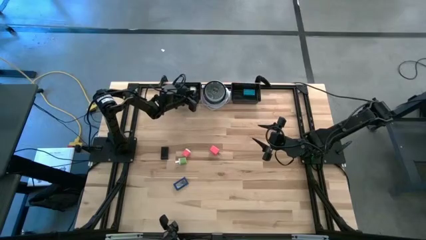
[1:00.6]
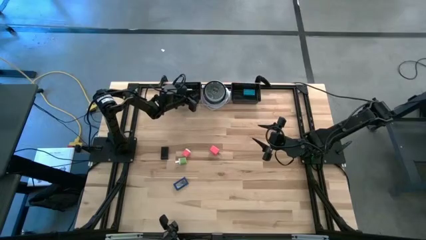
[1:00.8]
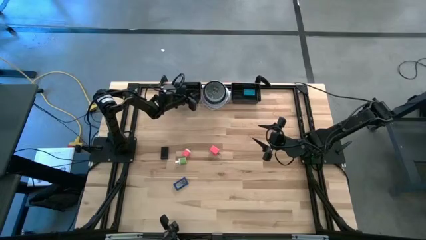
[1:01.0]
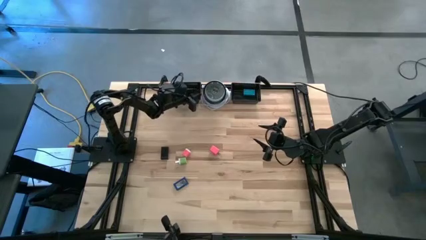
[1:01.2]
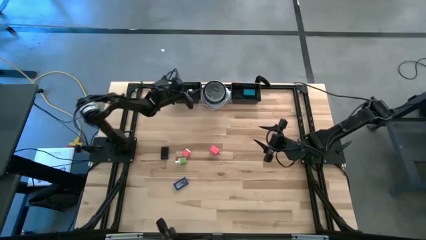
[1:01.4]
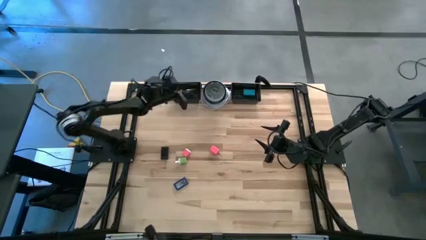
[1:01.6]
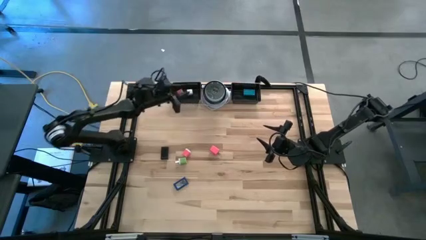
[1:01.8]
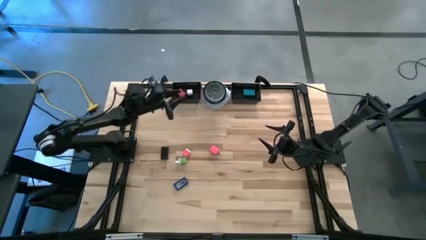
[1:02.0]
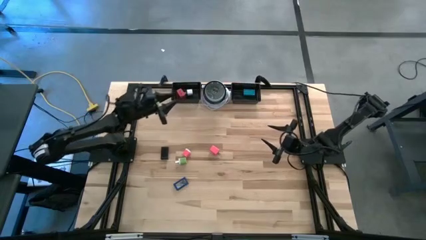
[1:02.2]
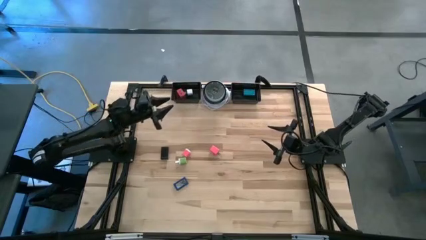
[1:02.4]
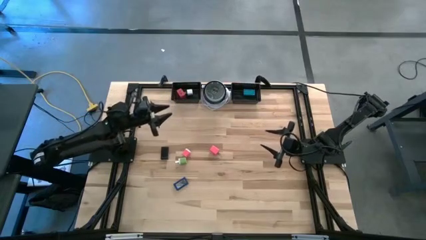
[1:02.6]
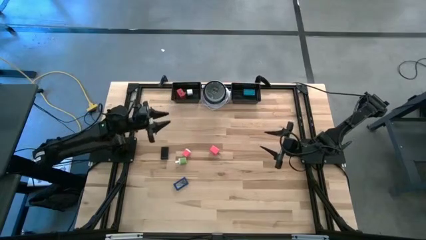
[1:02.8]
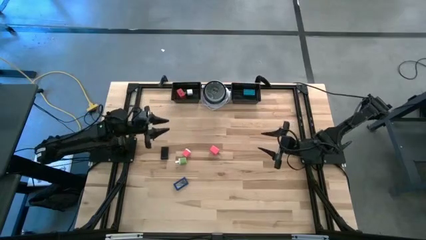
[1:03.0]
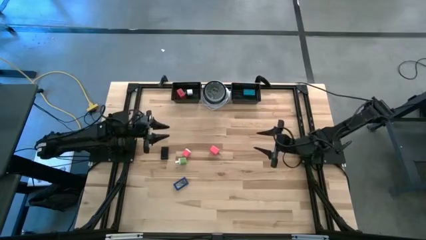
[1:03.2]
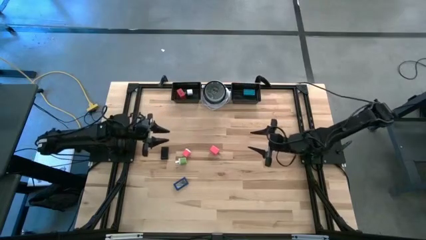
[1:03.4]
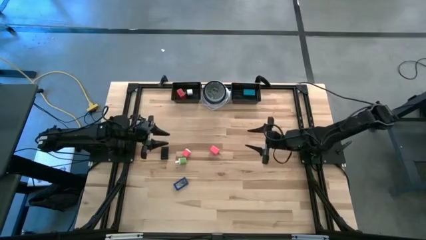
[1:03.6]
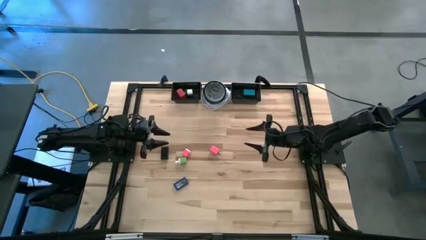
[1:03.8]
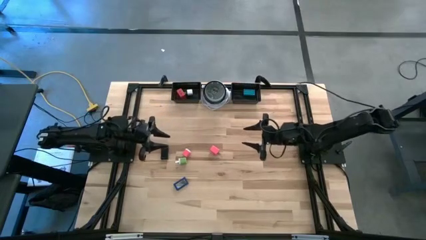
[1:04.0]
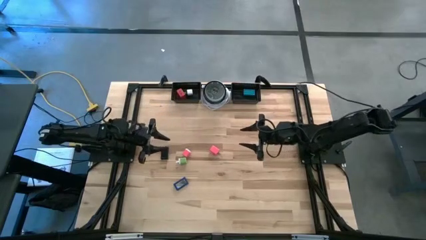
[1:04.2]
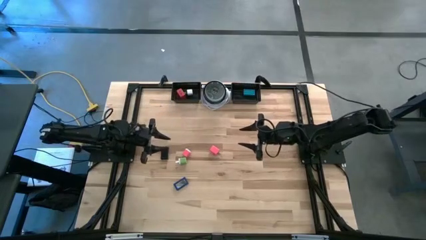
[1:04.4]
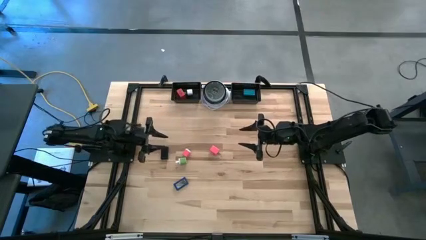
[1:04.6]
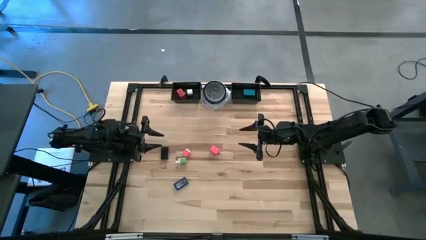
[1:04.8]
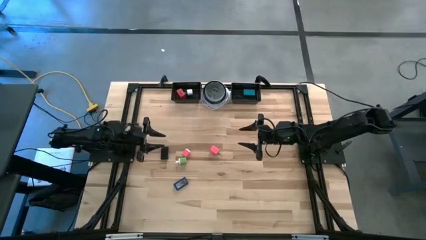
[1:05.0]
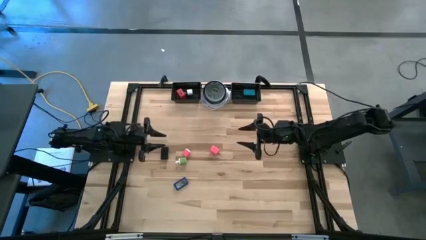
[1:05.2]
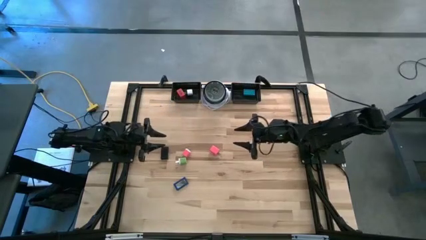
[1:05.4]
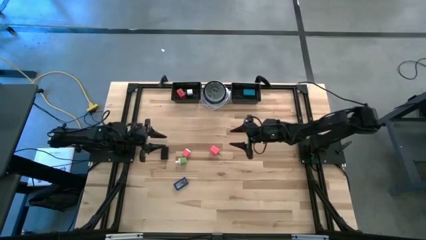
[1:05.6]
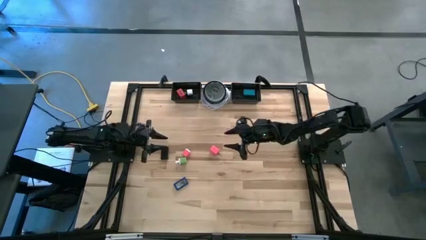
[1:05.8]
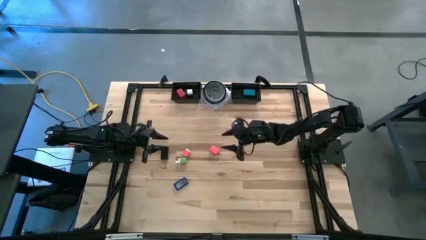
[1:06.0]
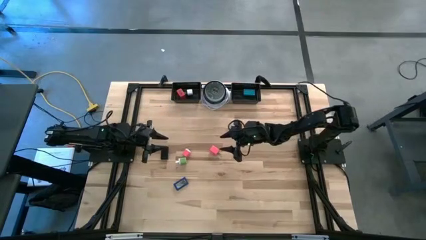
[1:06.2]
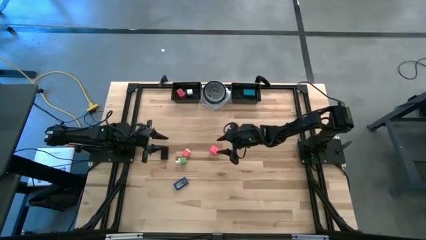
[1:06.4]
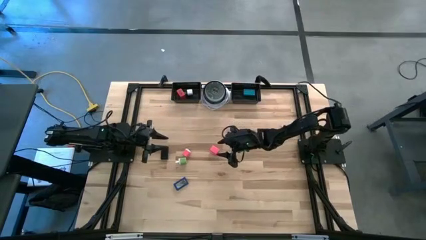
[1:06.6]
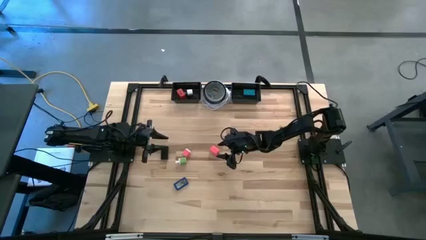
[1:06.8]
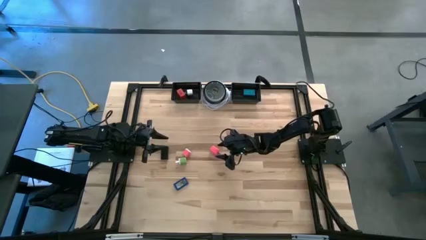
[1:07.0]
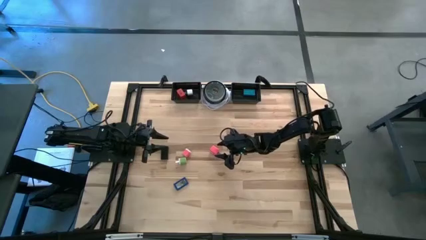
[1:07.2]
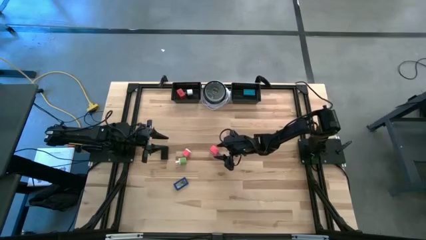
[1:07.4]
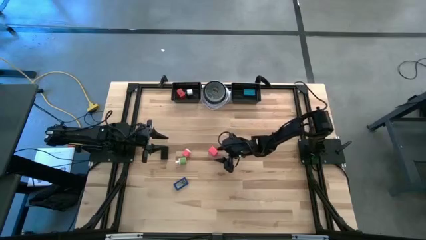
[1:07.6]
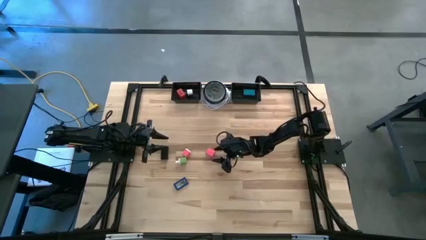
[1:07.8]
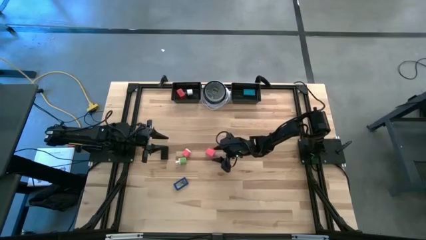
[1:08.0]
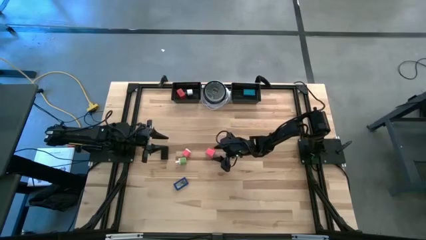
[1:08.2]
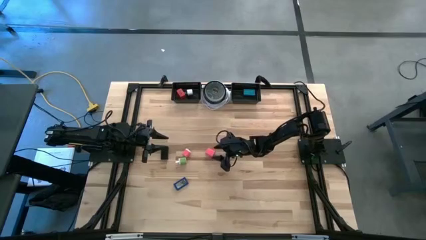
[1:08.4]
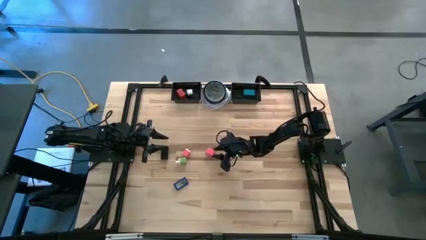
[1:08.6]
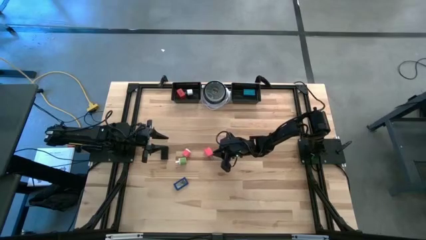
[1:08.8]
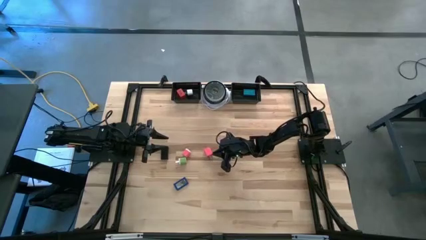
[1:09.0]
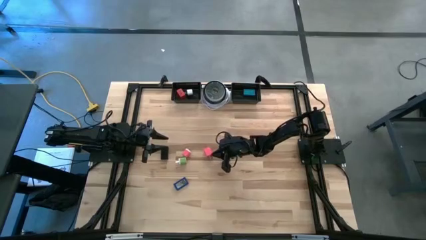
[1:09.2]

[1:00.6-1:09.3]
Task: Pick & Place Office items
Put the right pink charger adapter into the left black basket

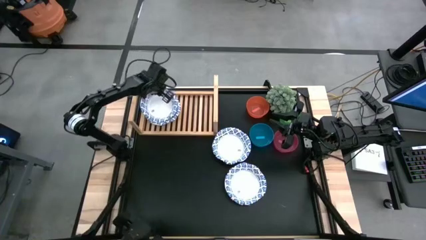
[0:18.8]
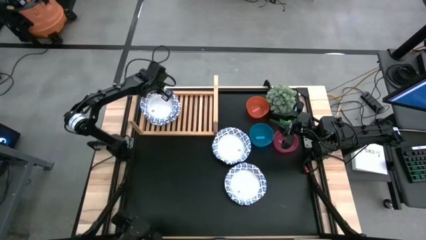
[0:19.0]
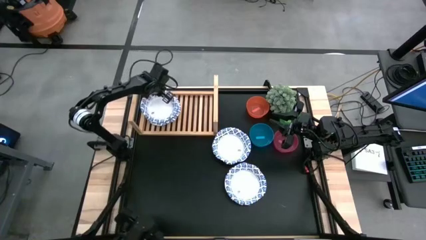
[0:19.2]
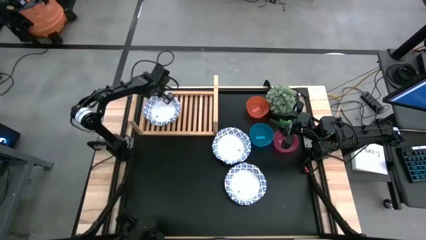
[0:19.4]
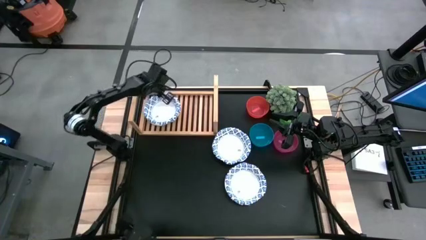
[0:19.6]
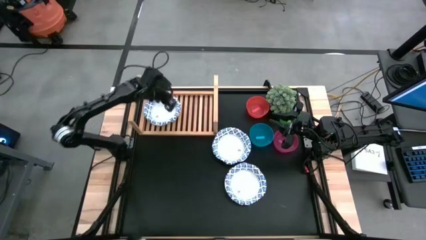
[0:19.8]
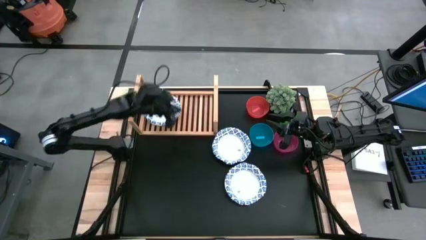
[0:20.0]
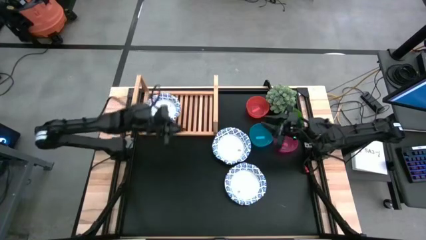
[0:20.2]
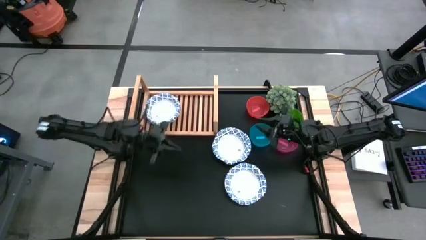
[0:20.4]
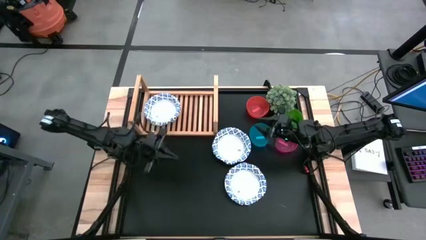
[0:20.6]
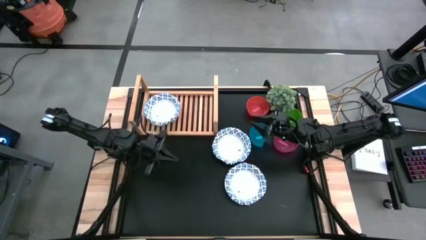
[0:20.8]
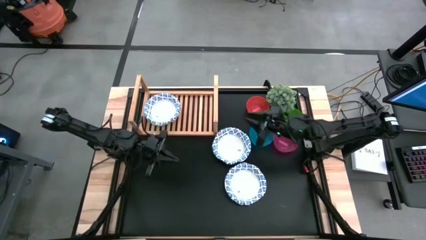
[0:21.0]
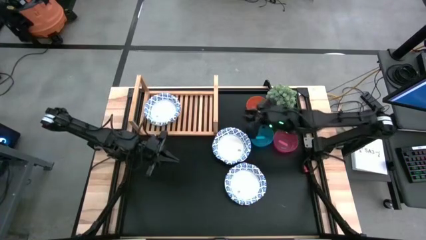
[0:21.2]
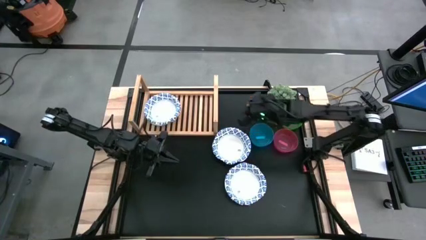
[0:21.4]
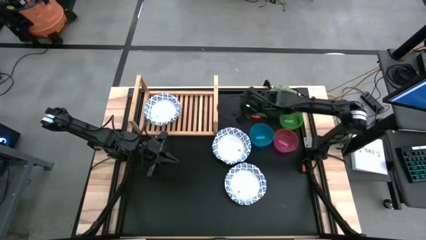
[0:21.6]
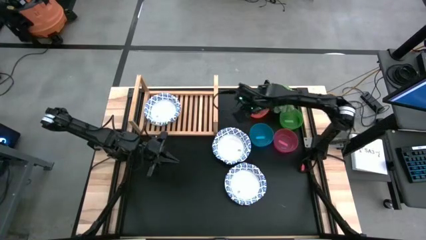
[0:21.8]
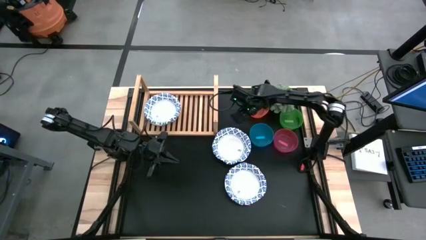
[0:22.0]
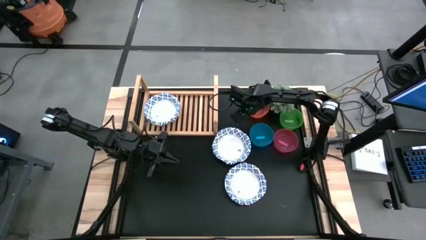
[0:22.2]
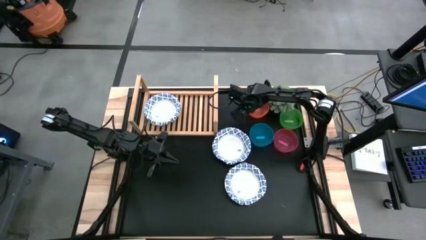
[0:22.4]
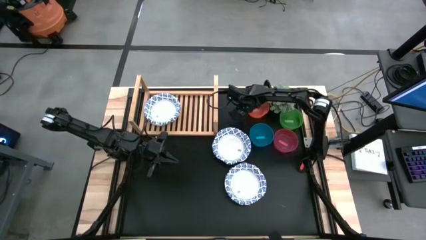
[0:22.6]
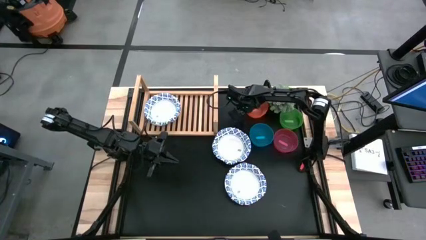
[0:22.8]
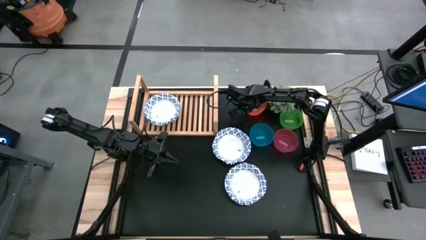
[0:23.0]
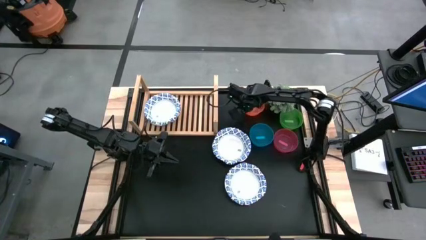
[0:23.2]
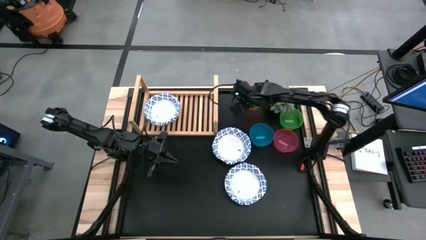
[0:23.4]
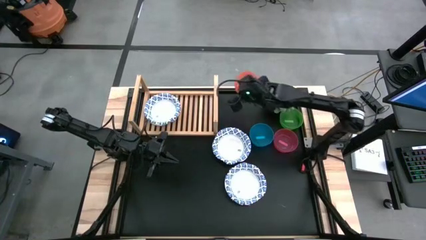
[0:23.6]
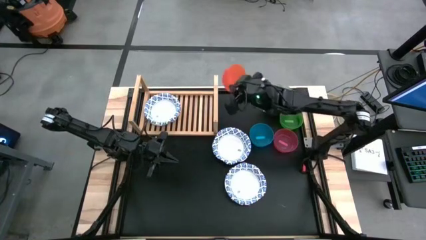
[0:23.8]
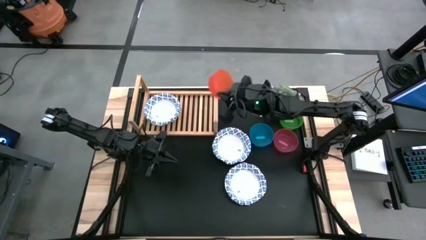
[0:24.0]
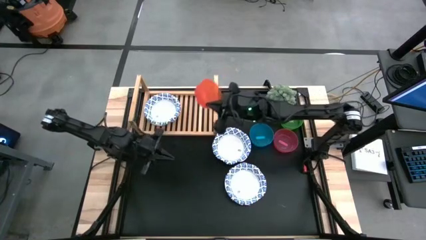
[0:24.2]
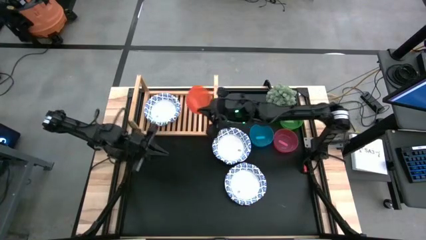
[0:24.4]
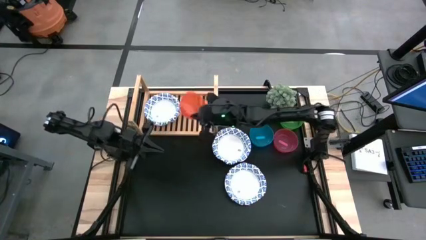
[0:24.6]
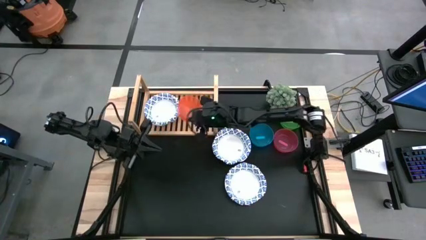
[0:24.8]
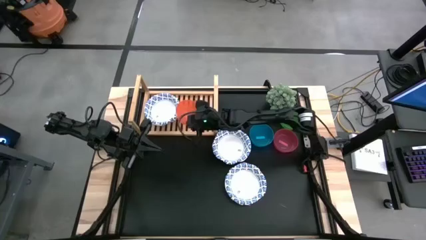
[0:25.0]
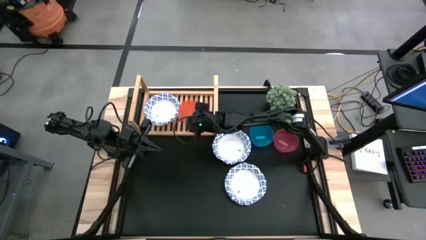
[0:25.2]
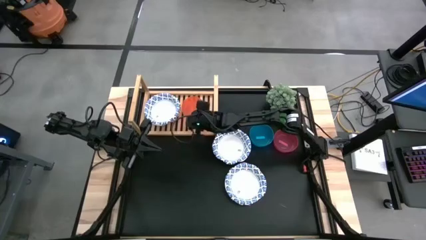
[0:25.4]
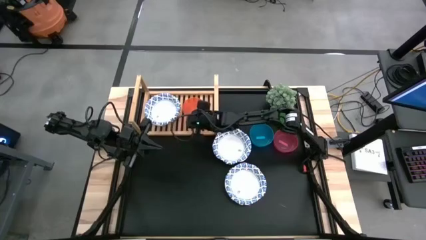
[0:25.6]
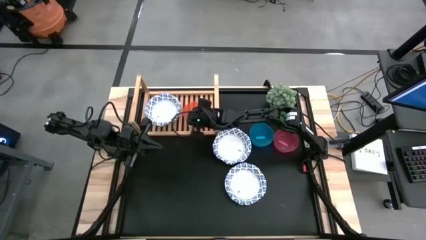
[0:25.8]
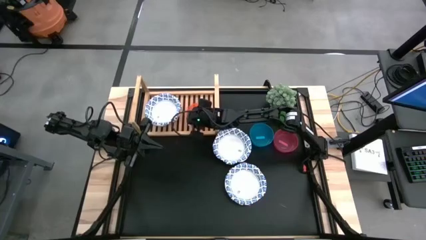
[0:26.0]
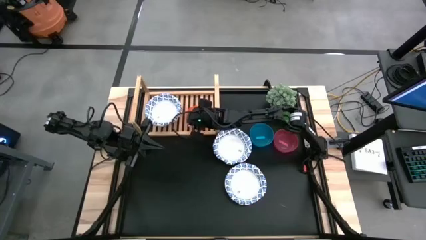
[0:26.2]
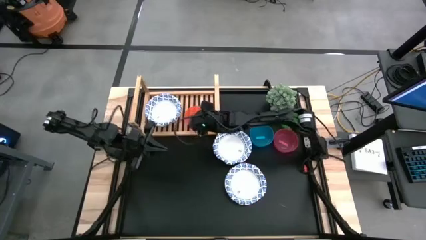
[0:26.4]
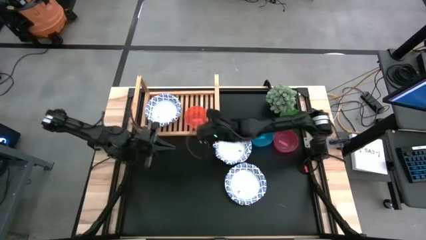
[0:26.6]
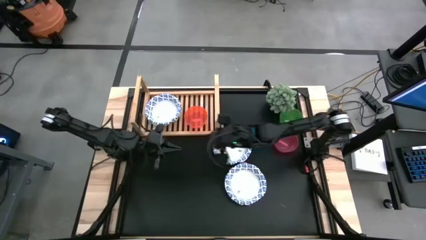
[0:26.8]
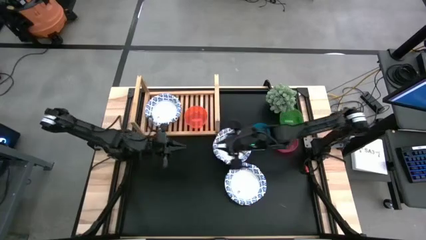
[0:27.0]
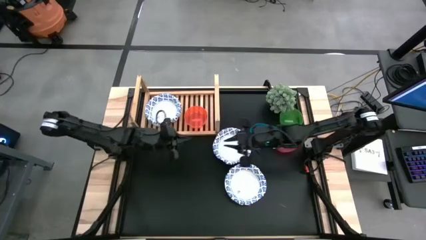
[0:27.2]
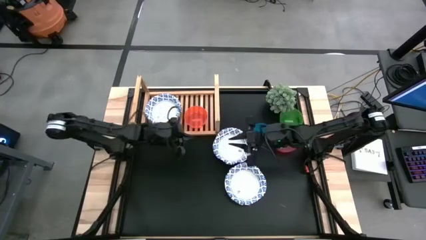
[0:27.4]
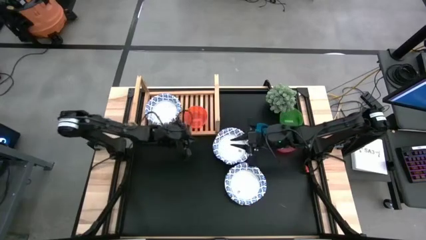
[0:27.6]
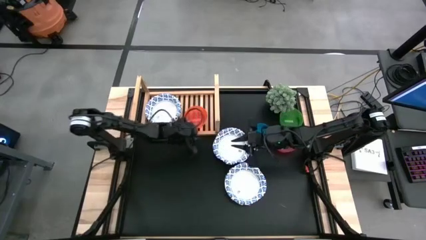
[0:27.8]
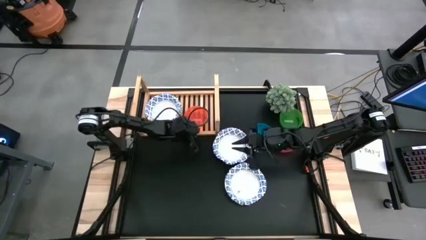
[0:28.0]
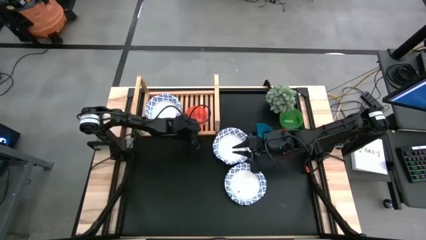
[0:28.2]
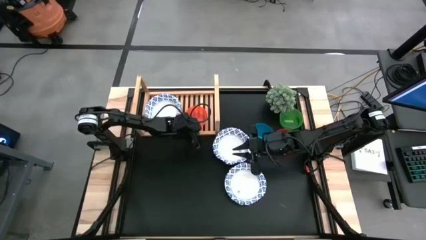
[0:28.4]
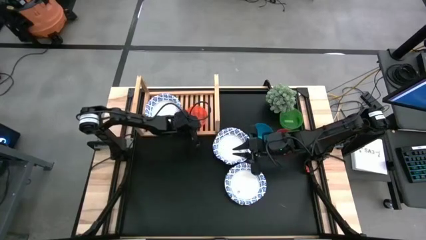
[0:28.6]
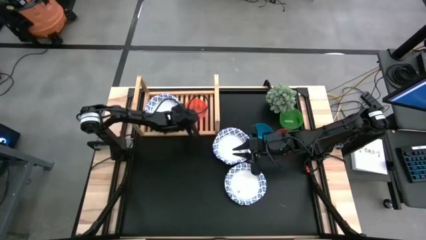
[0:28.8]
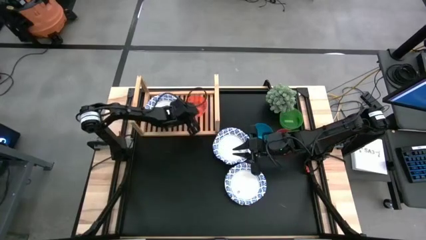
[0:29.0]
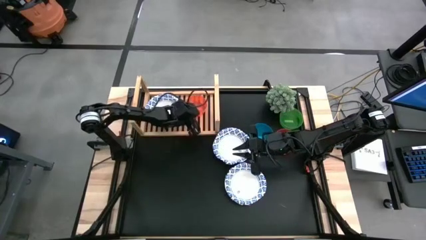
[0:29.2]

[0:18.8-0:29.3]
Task: Place and stack plates onto a shelf
Put the orange bowl on the shelf
